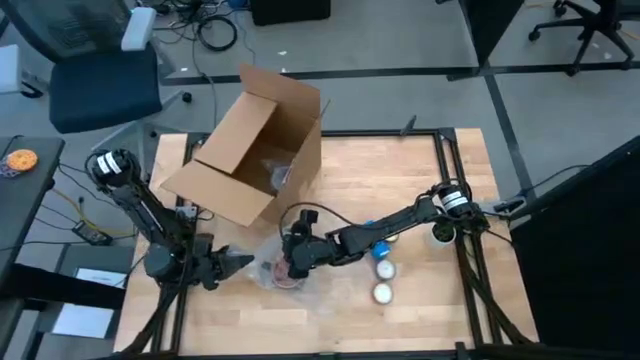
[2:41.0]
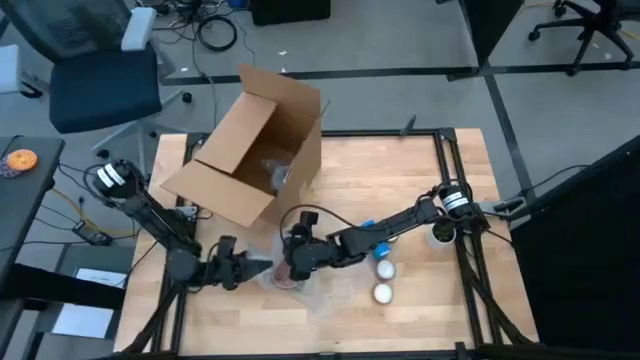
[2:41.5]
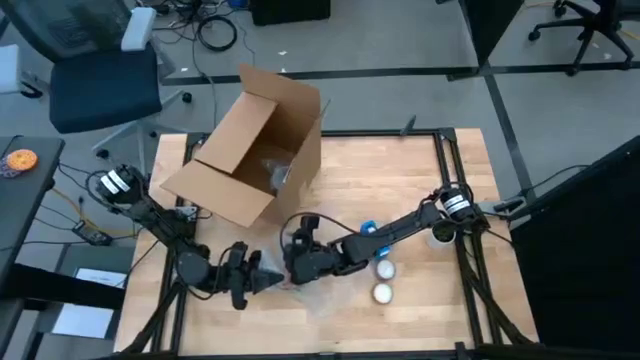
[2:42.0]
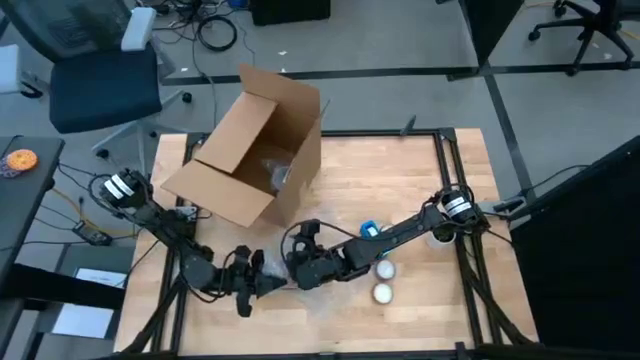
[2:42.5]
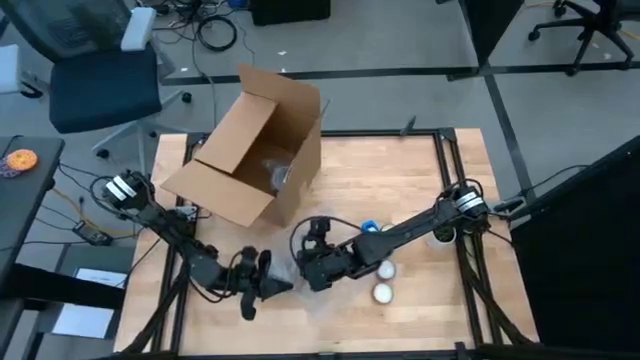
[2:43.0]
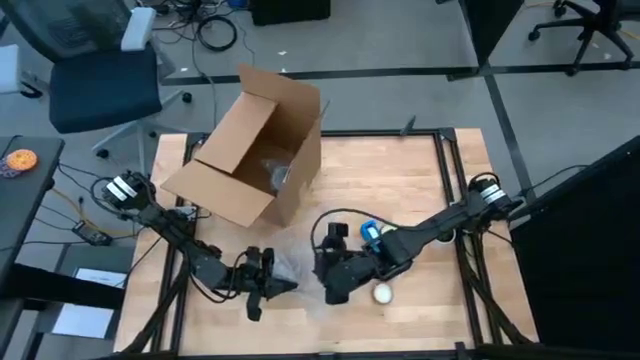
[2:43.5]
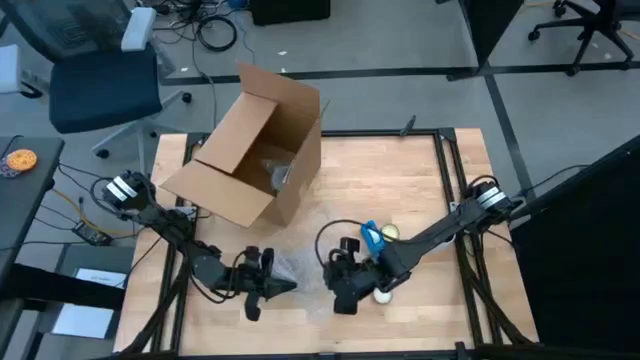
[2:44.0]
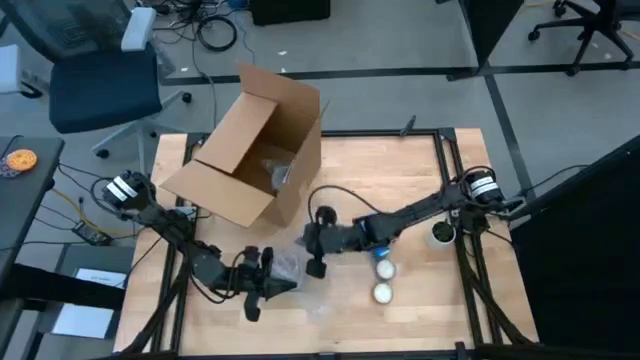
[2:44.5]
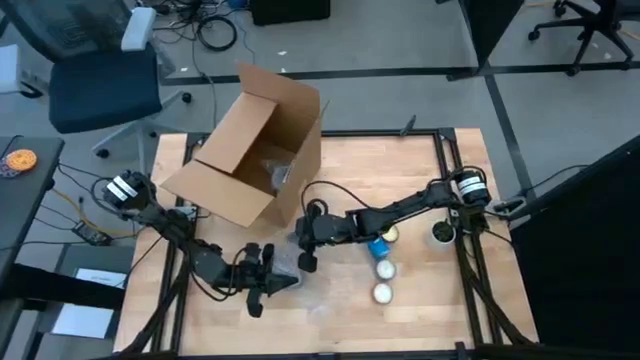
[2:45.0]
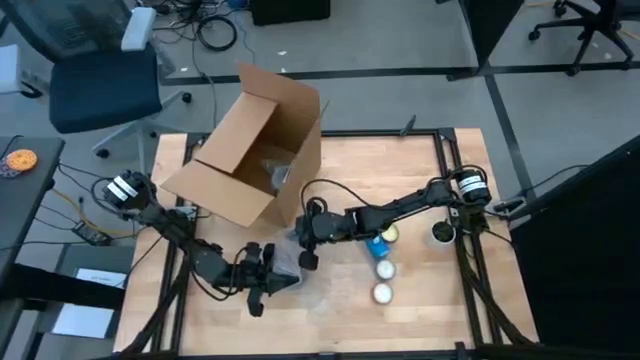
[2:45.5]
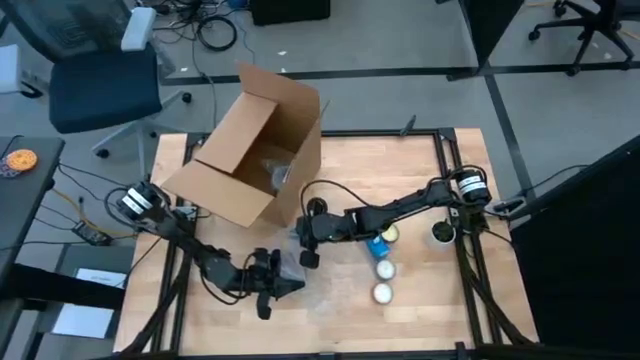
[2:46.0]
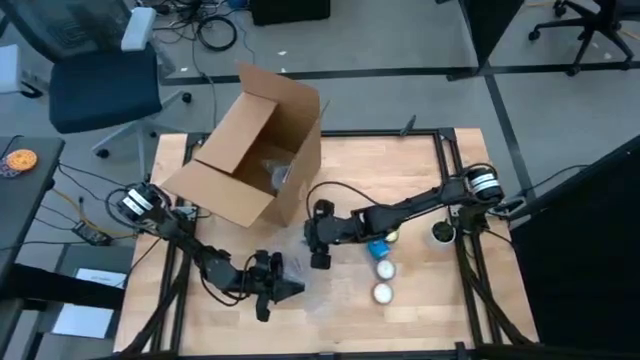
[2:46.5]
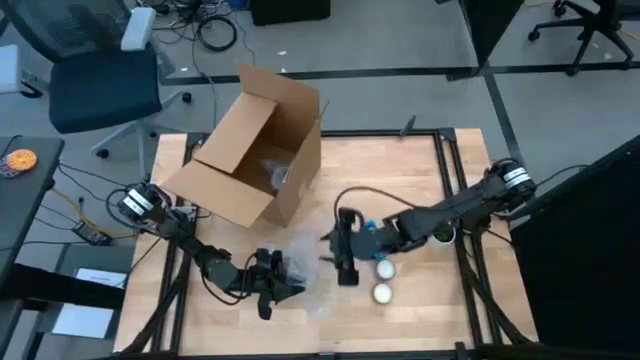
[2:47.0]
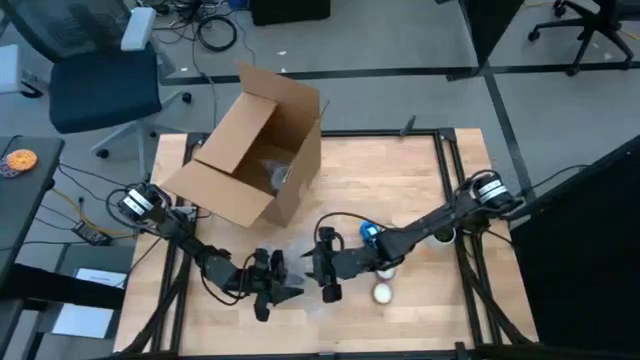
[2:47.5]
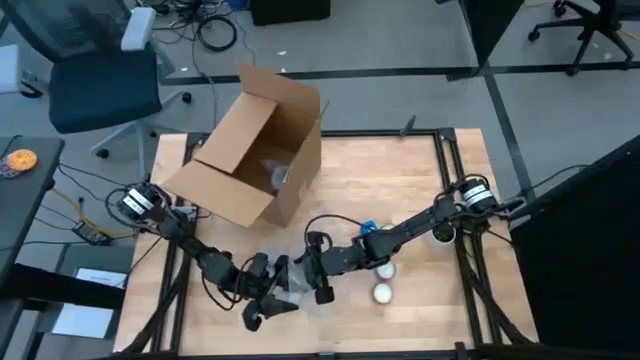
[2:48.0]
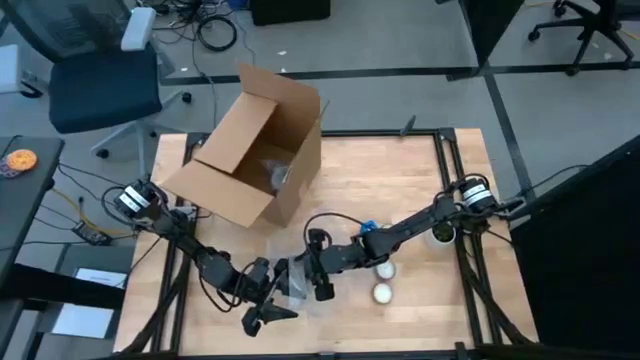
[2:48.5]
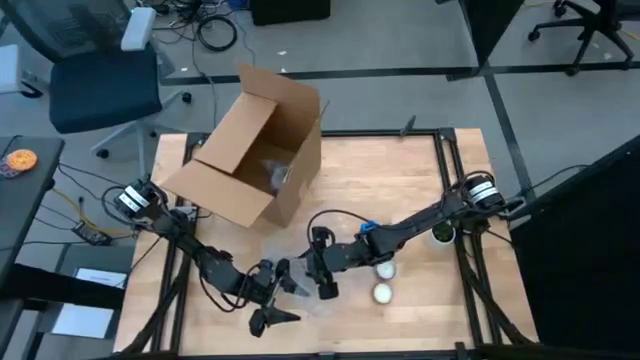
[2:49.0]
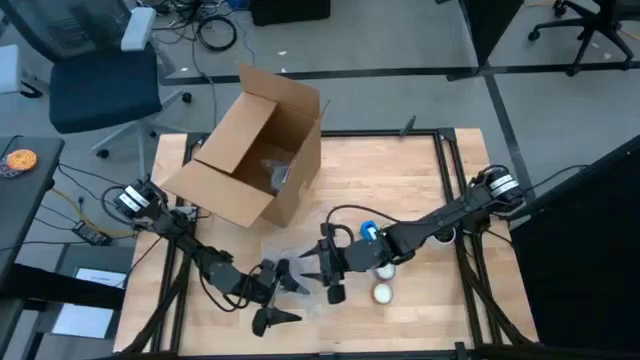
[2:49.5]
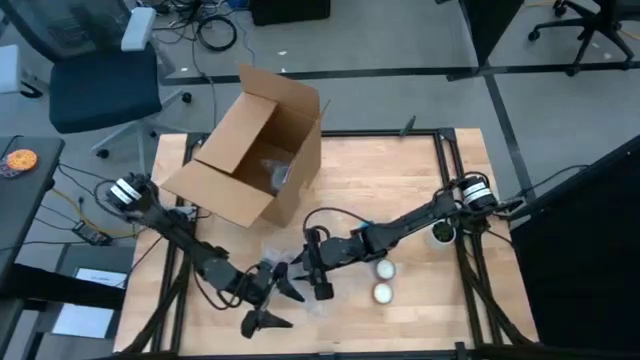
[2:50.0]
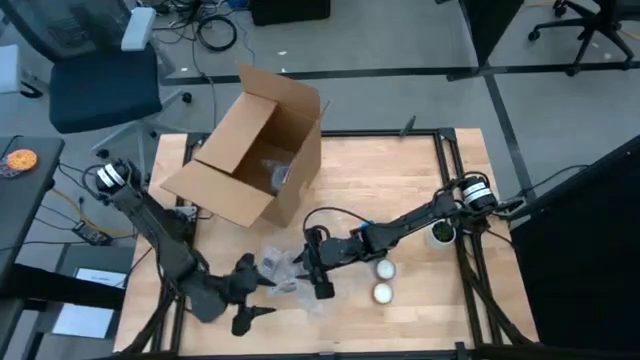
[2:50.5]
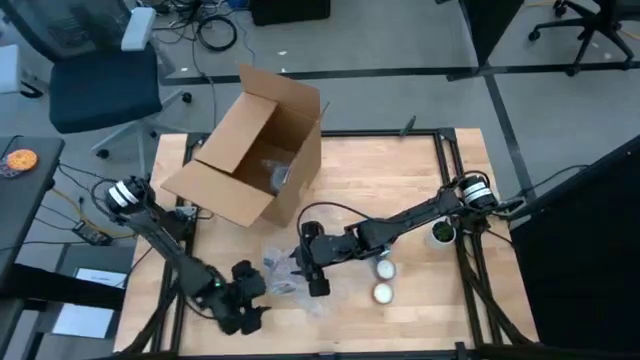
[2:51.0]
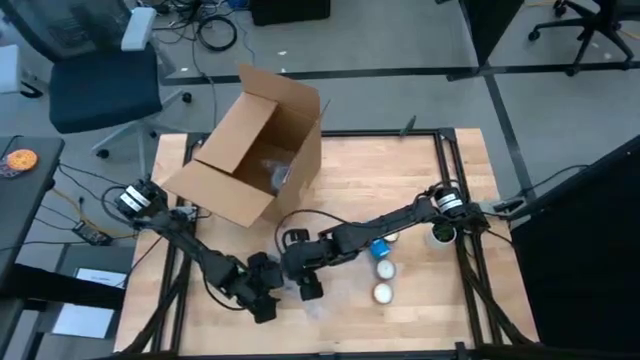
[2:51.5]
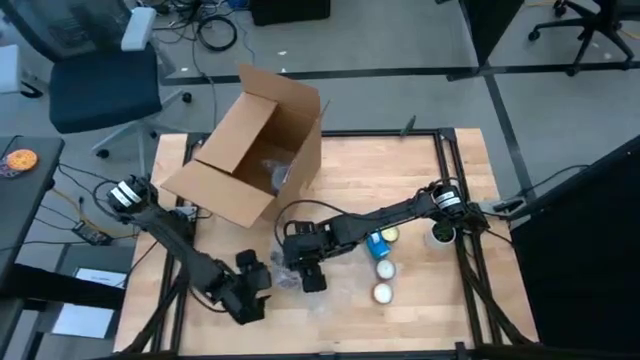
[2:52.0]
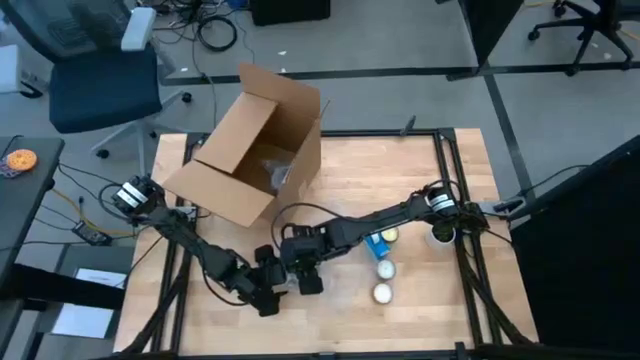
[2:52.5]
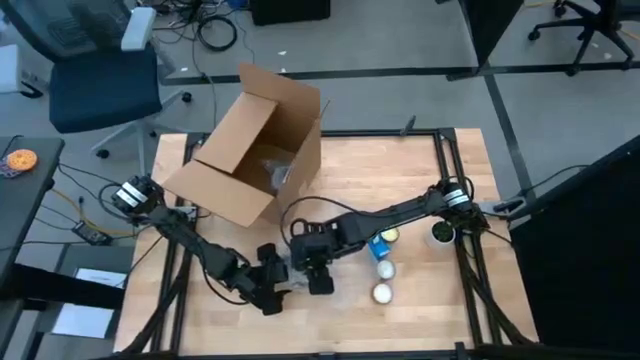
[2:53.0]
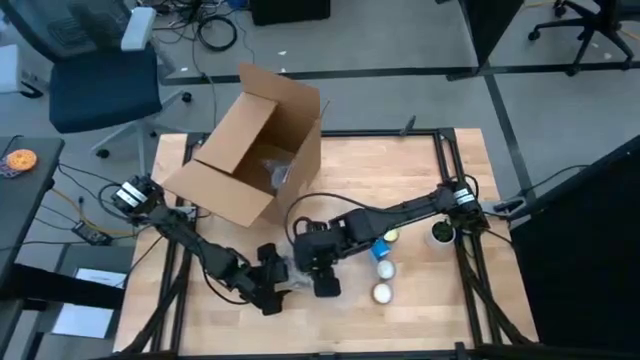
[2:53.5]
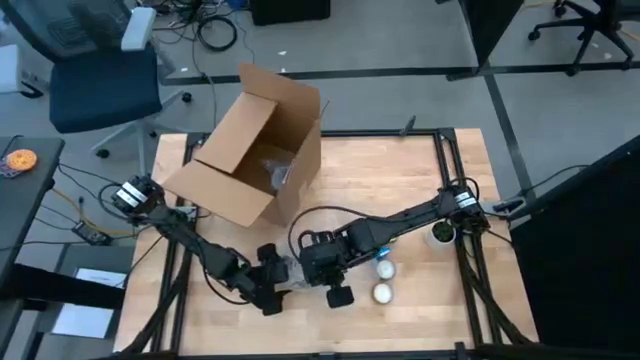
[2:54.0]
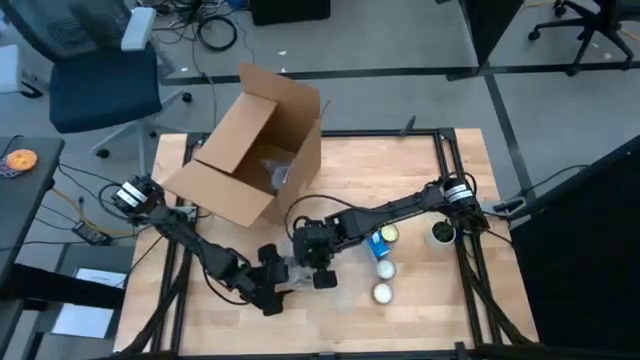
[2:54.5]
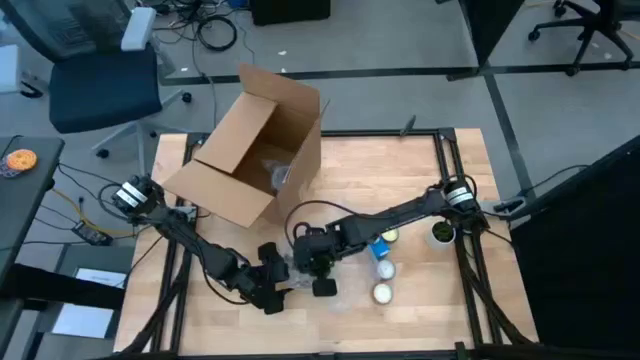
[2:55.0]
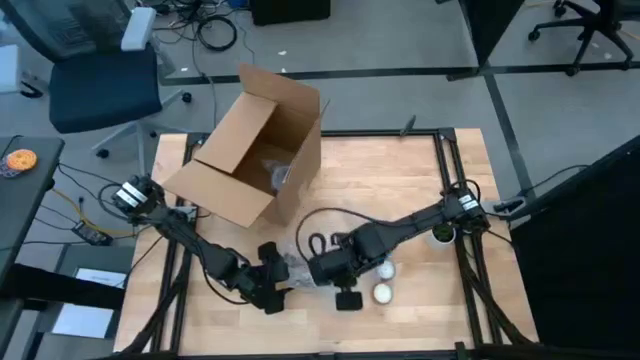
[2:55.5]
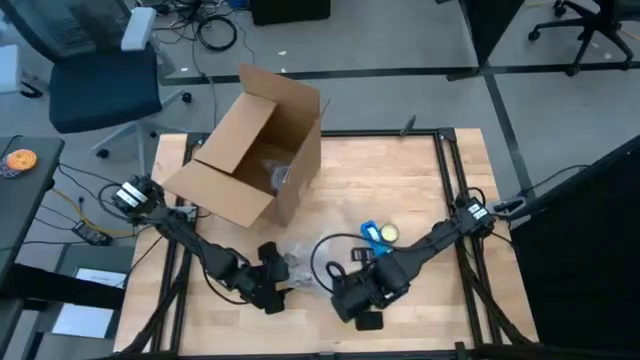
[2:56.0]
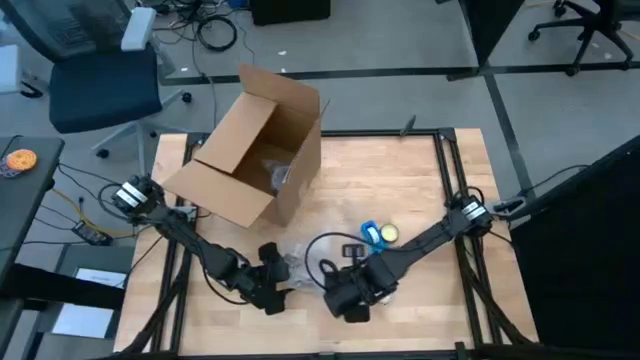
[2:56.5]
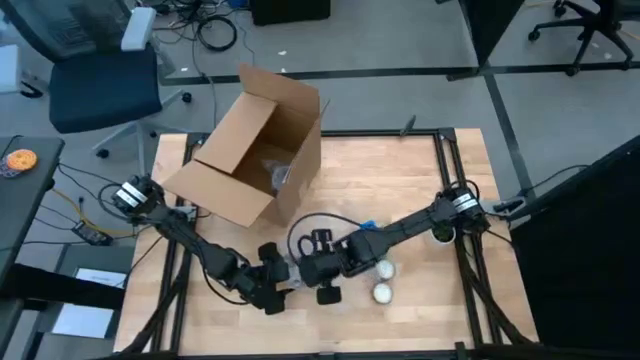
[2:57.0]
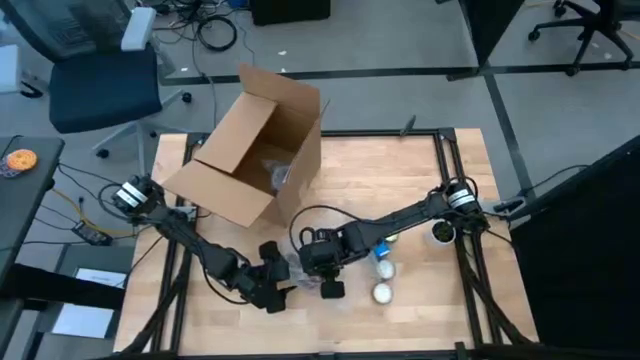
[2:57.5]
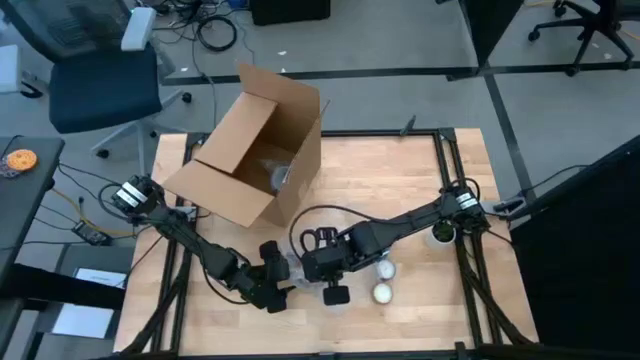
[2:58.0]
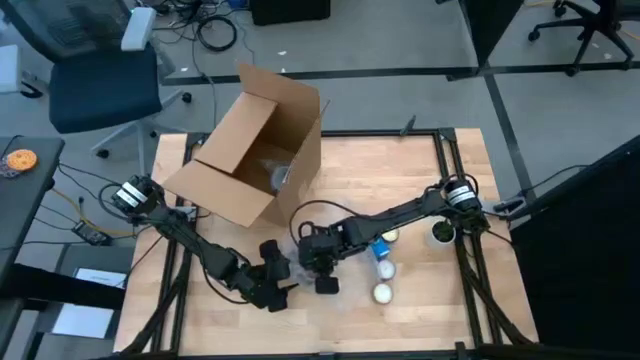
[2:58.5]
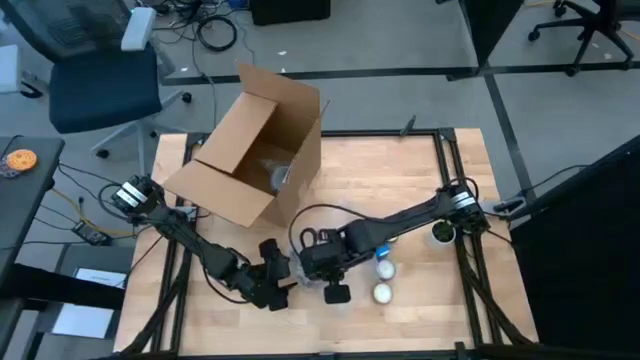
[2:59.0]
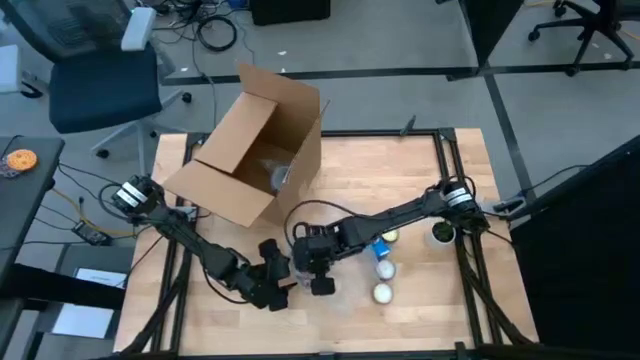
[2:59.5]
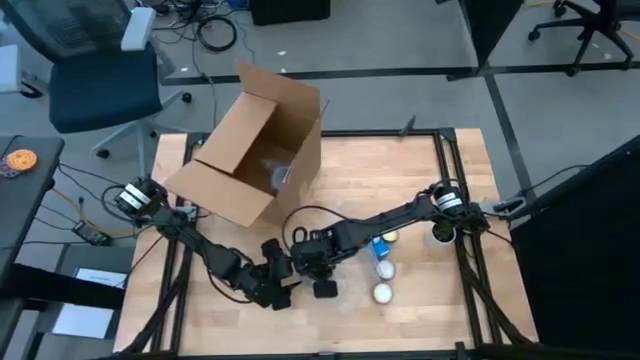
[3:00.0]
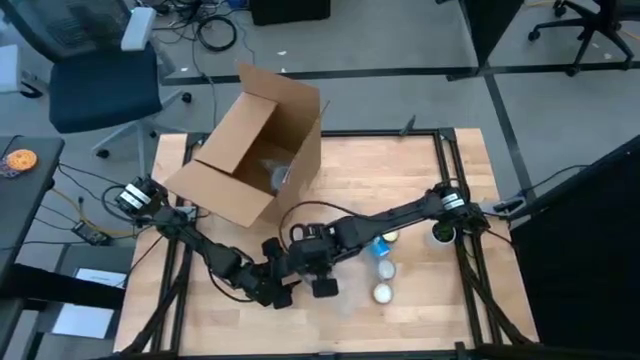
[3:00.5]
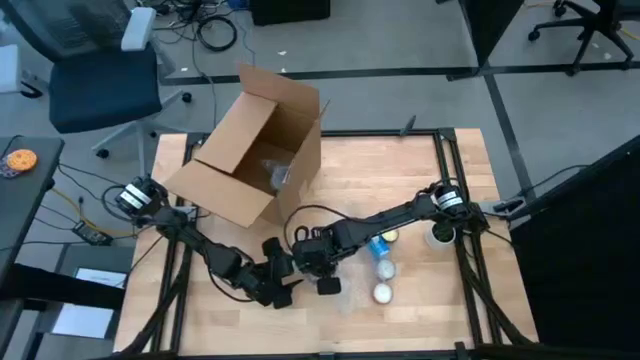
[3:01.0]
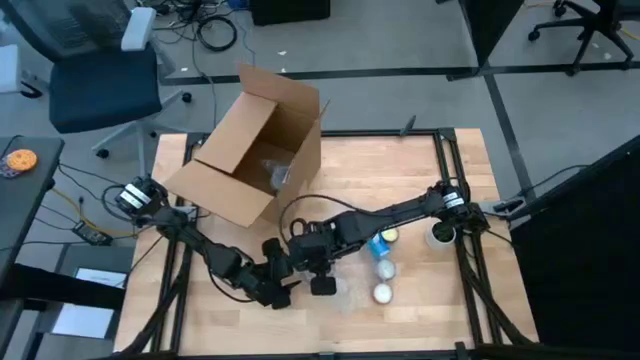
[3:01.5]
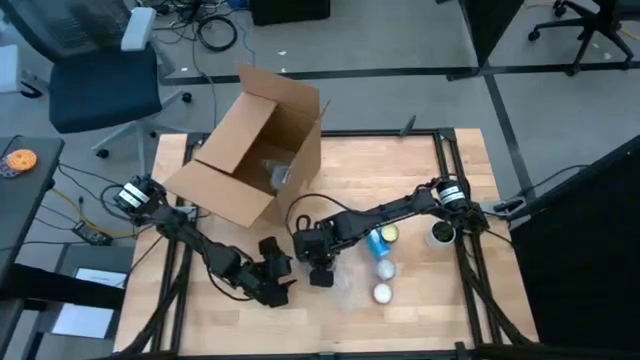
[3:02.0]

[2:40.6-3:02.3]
Task: wrap mug
Wrap the mug with the bubble wrap
